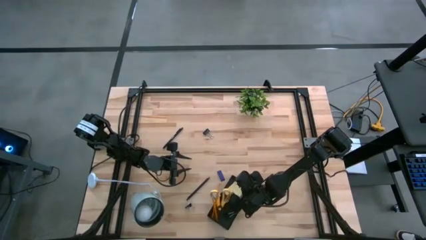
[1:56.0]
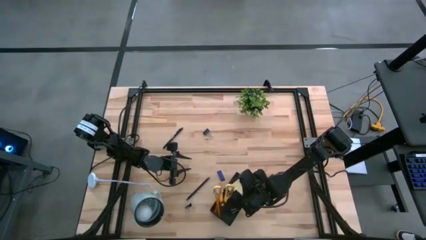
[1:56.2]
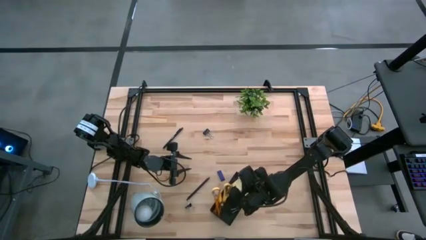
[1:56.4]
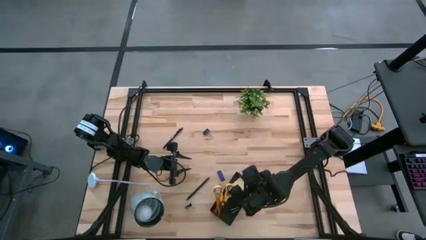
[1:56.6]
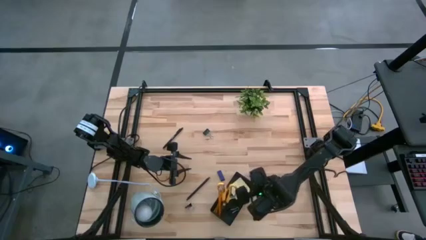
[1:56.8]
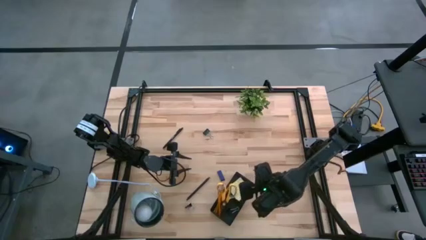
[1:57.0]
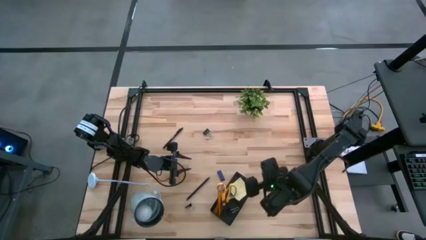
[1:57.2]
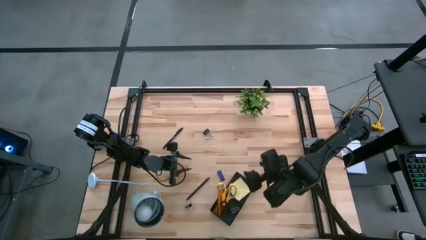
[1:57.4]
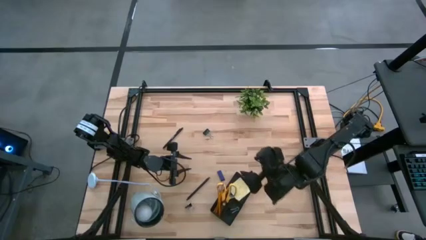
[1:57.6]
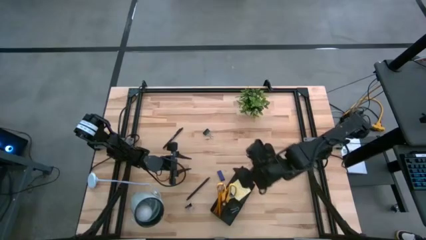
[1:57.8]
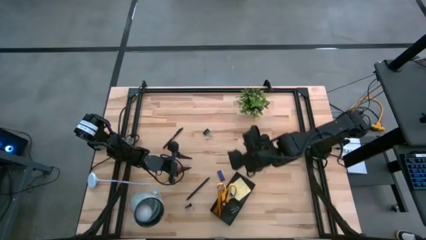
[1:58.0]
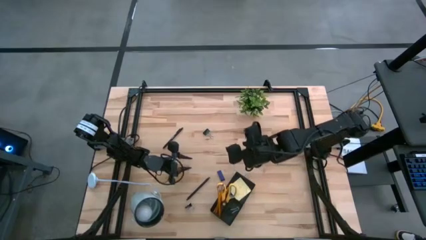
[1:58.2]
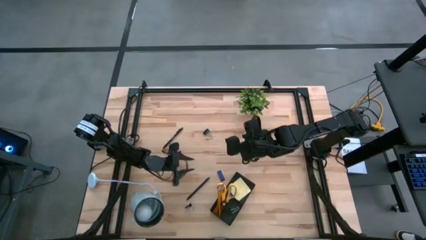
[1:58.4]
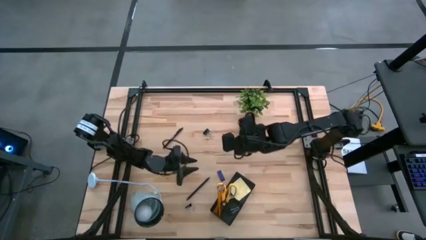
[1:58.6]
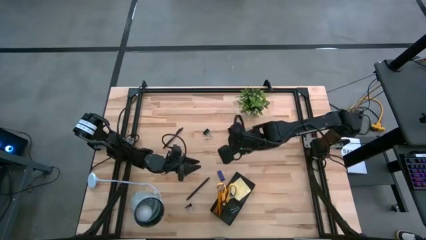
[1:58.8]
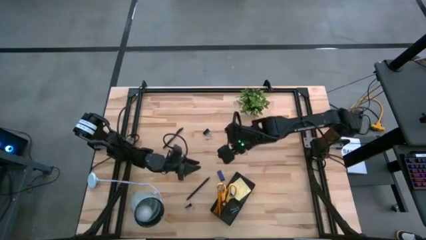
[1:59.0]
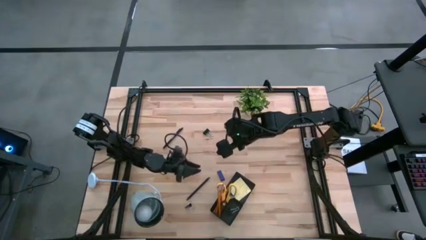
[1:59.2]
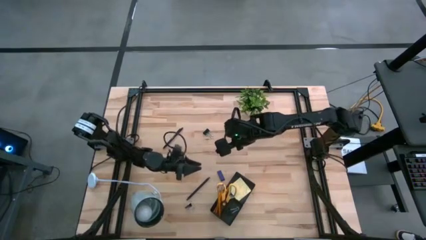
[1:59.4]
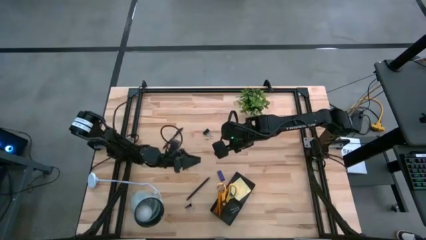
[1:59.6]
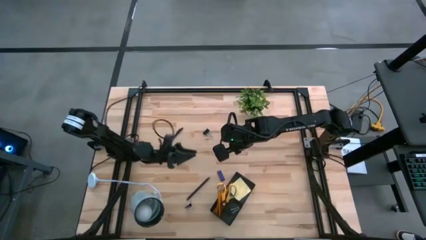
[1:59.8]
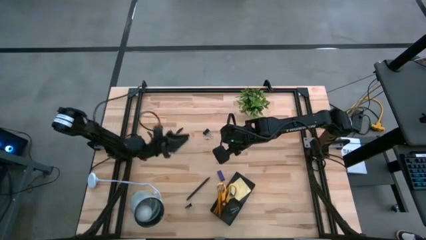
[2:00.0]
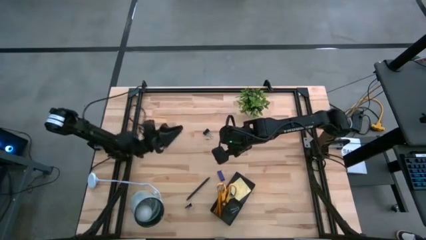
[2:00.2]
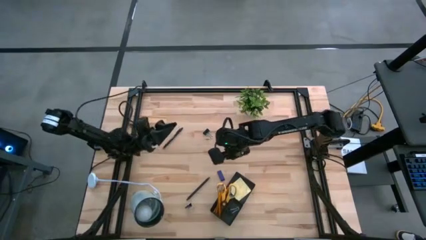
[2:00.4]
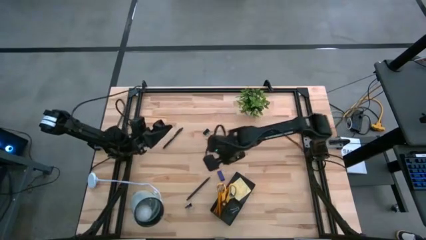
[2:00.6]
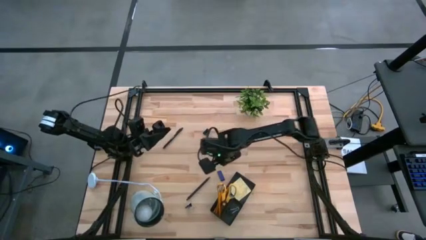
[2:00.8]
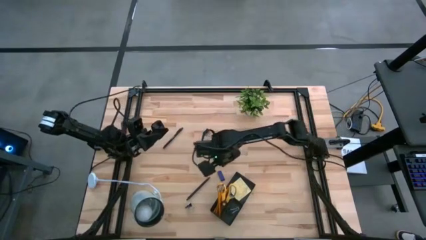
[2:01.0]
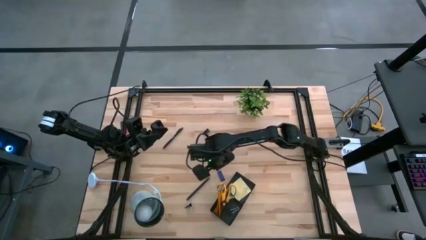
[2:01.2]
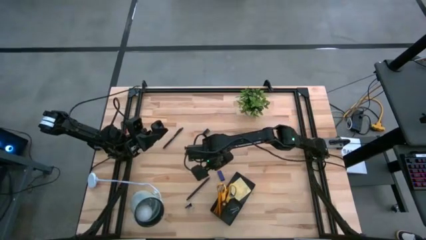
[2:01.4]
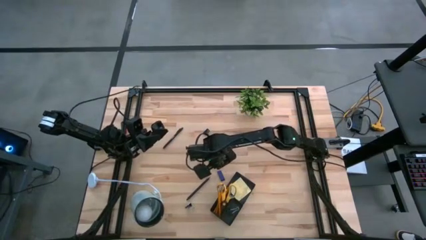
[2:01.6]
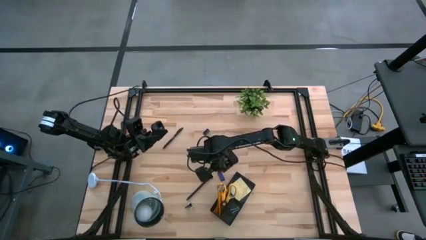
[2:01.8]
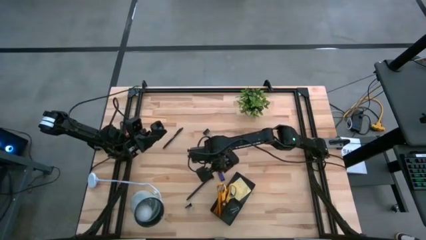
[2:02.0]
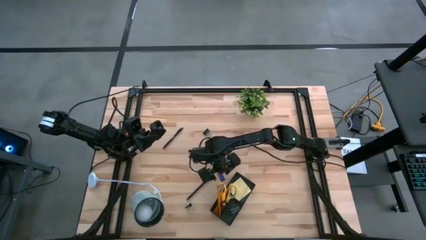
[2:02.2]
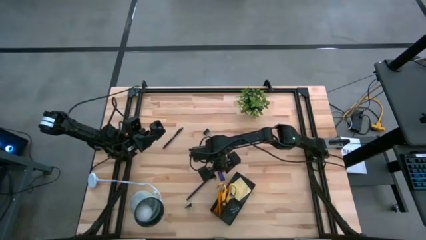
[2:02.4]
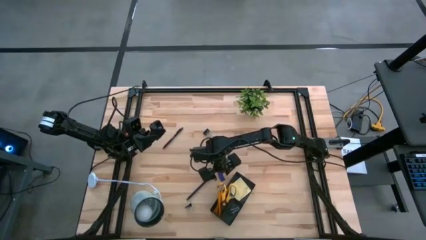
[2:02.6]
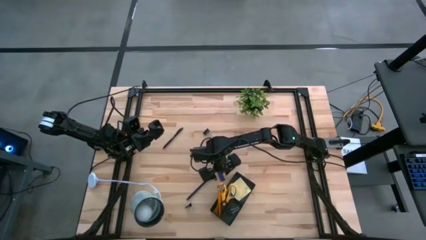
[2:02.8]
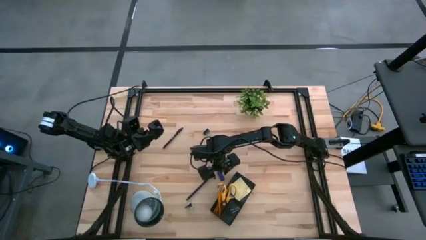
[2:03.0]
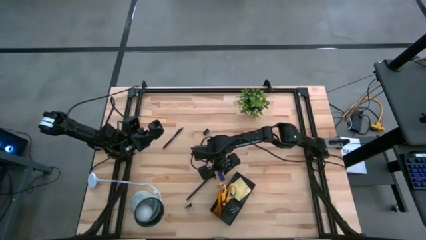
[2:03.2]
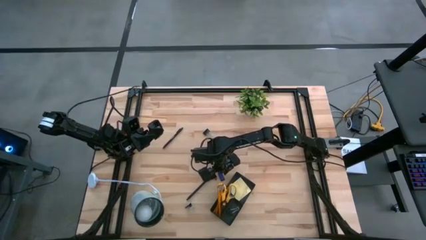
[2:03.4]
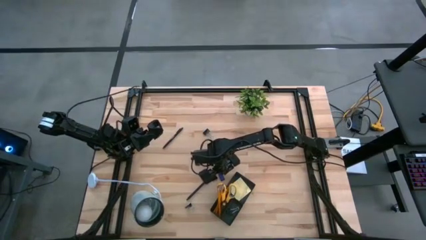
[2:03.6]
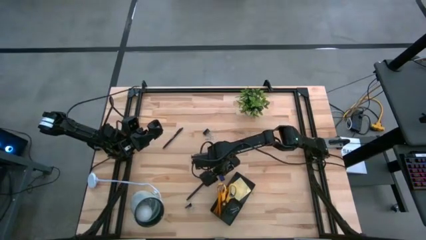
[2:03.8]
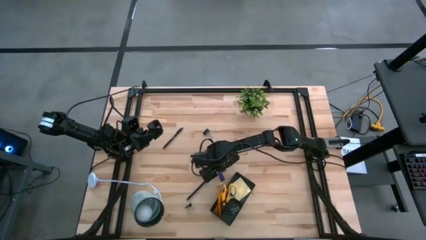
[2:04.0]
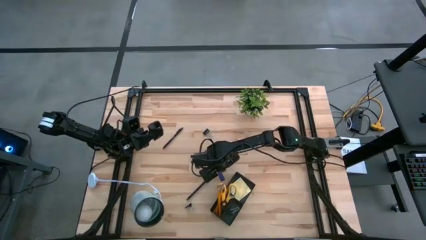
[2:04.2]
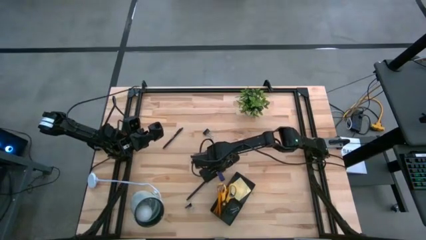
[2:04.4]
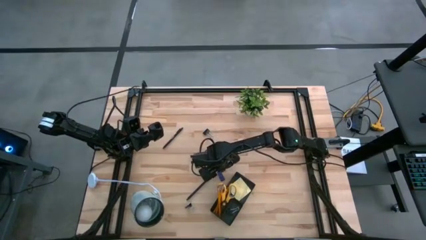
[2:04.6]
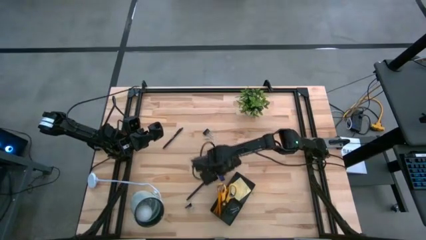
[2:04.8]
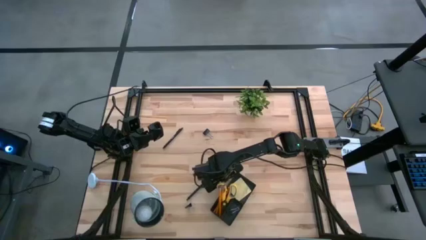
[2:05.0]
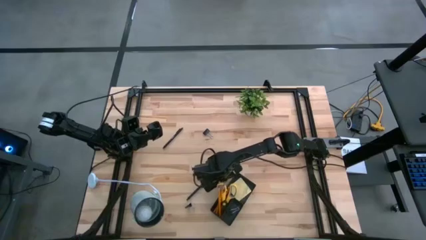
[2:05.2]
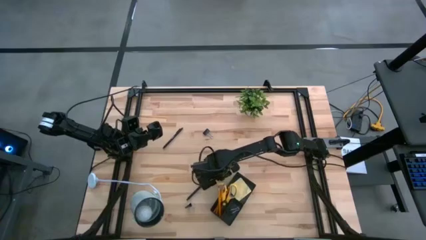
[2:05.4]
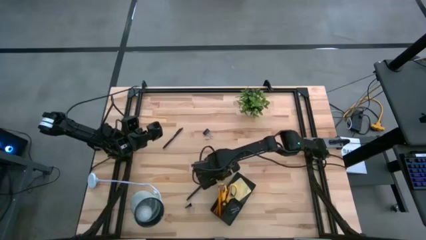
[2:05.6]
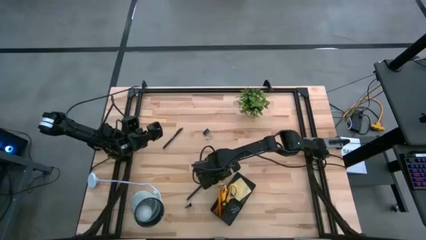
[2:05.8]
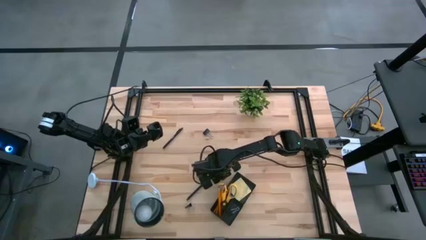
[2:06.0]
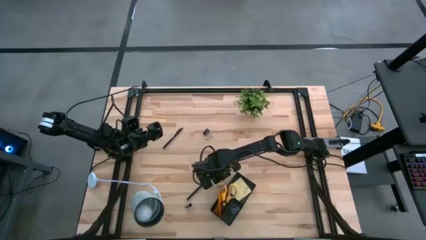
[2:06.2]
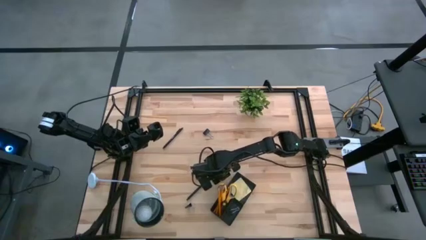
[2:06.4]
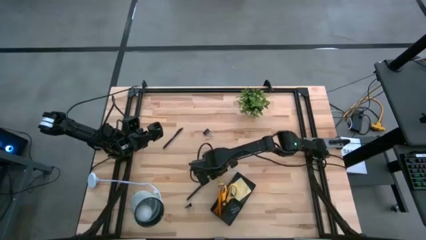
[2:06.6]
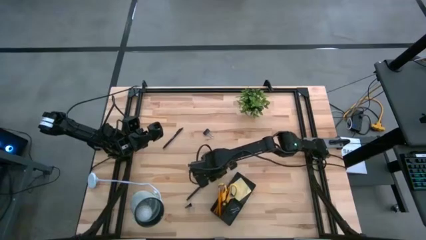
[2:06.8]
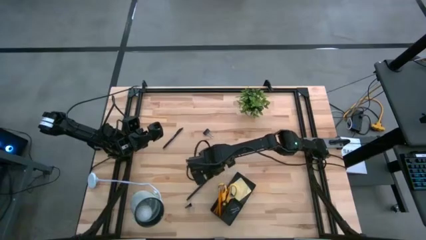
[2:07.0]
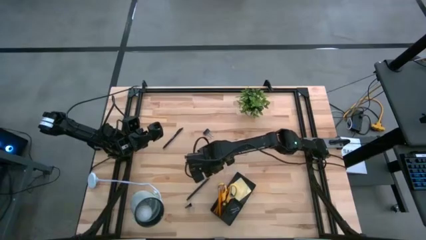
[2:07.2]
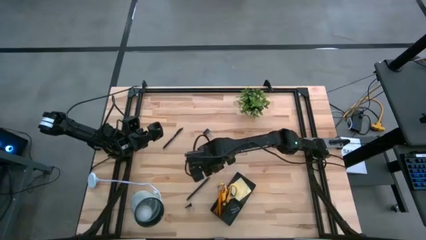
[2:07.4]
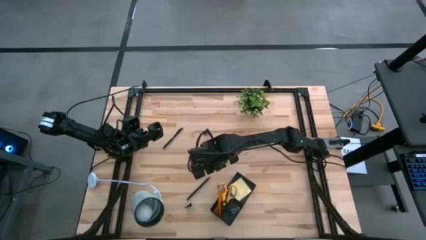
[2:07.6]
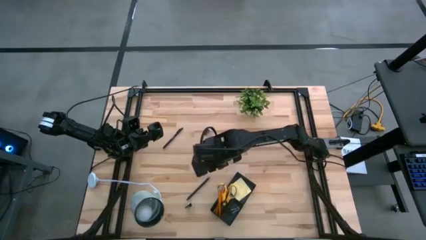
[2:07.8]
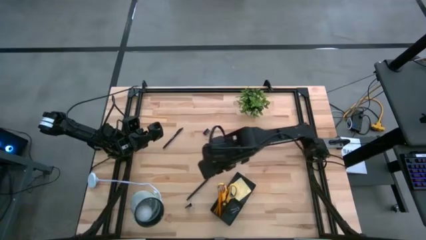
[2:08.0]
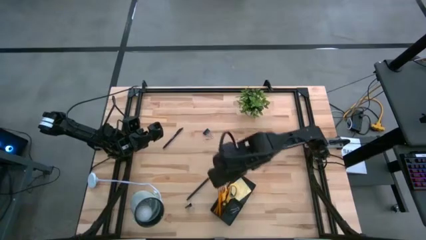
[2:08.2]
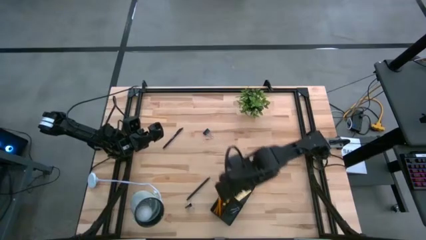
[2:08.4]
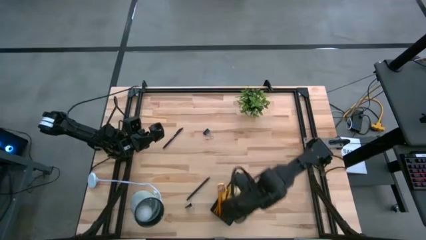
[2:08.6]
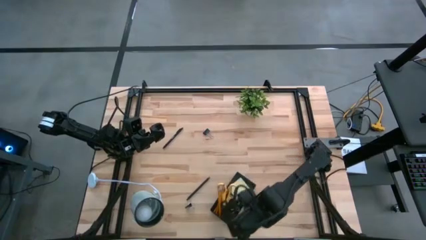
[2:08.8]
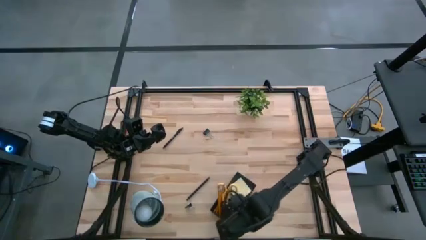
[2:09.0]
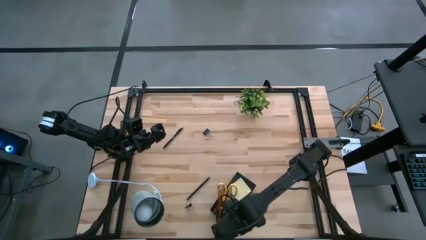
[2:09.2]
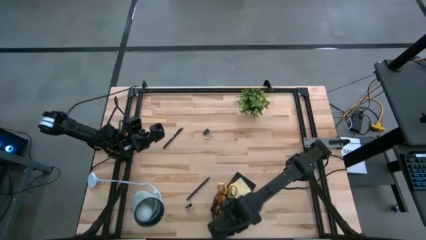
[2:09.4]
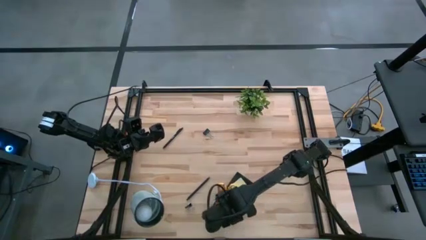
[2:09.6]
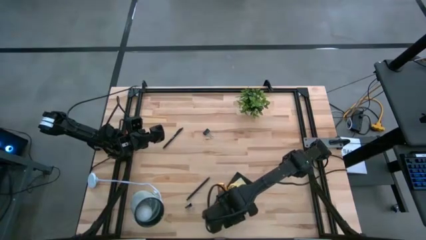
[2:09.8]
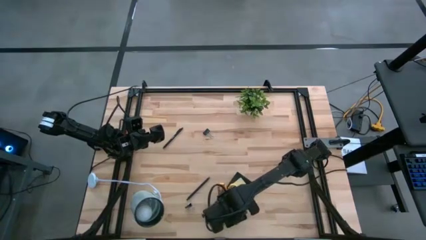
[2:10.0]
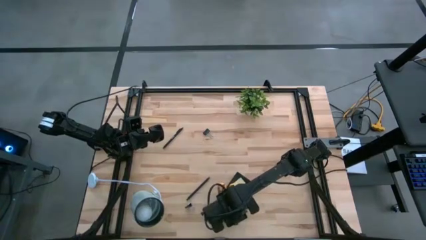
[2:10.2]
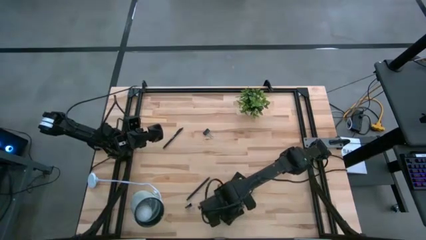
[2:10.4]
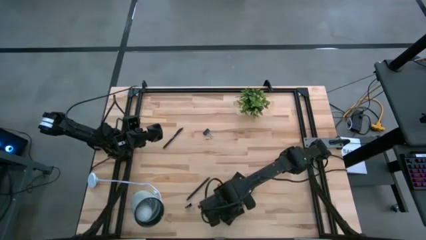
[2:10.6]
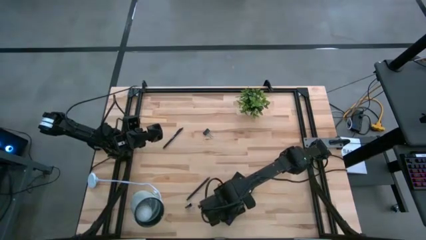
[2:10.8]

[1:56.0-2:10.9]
Task: Pick and place office supplies into organizer
Put the eraser into the desk organizer
